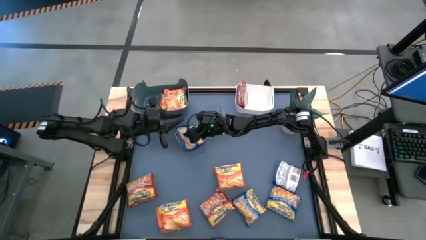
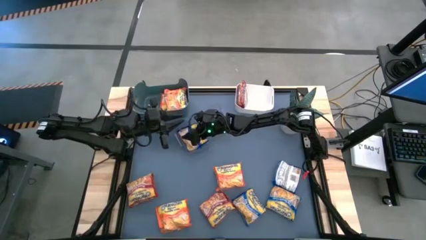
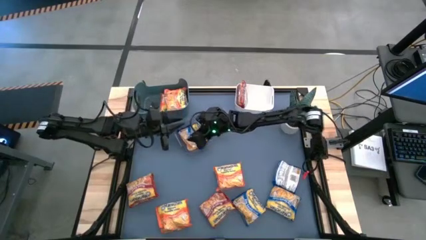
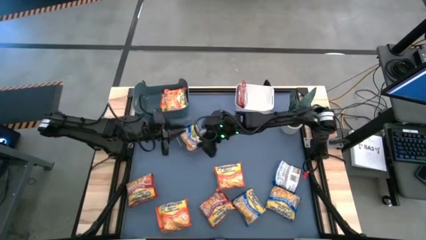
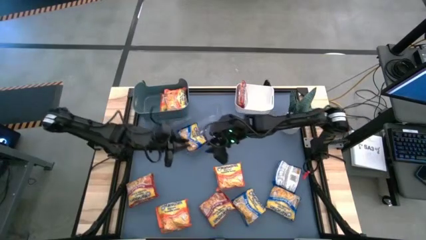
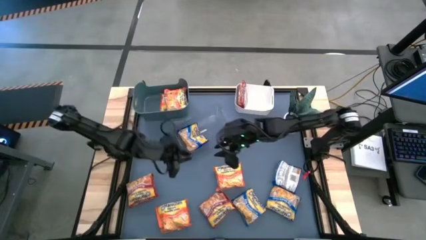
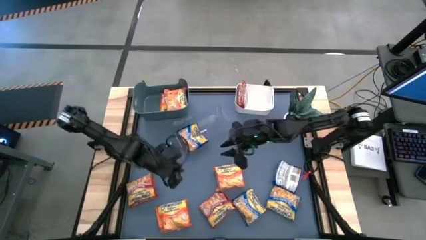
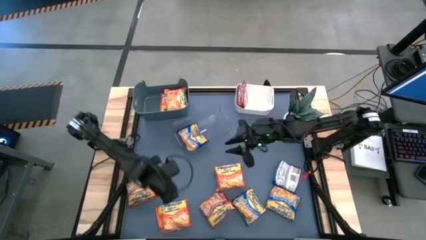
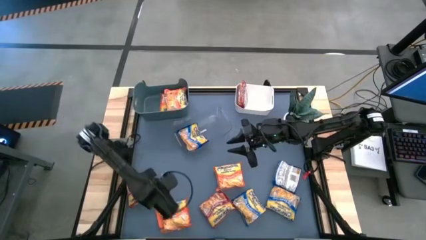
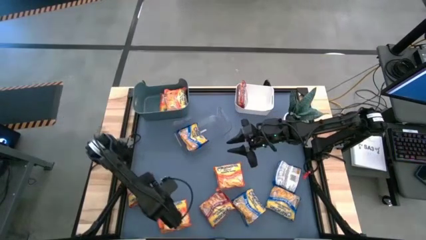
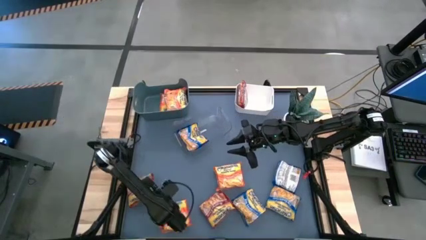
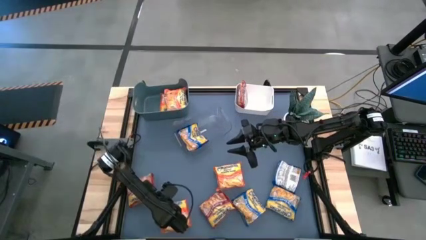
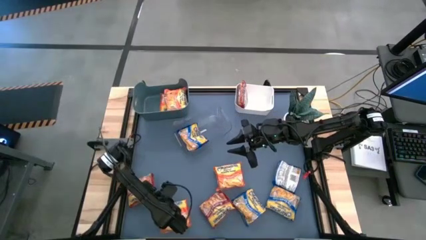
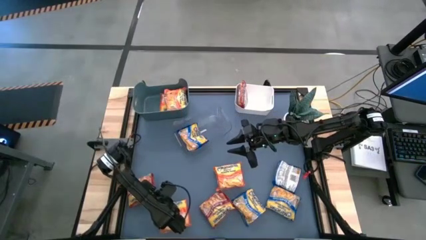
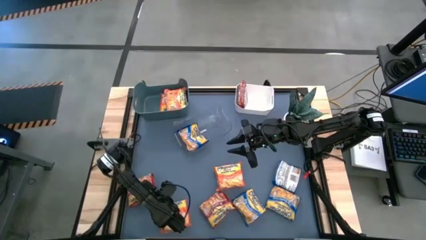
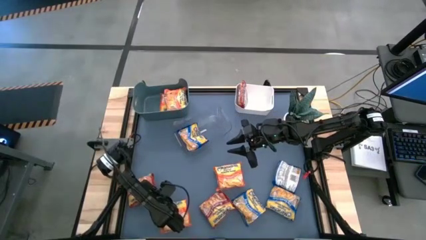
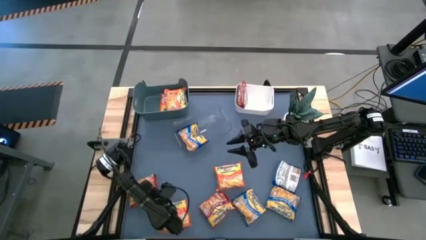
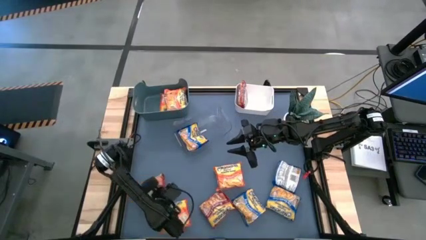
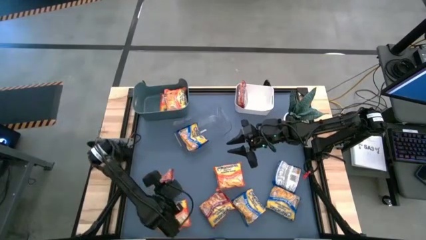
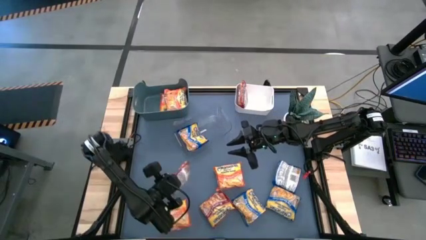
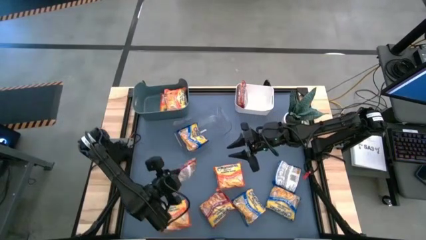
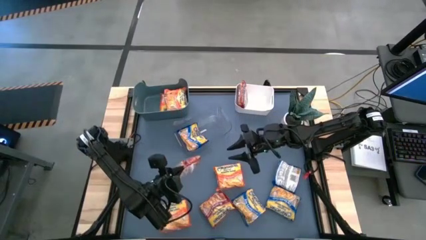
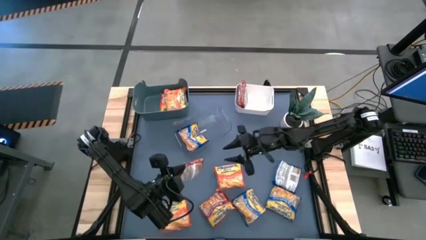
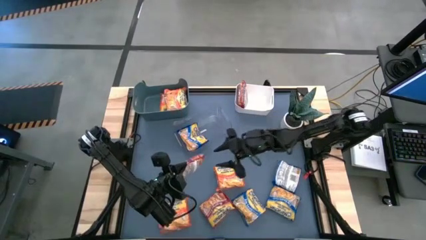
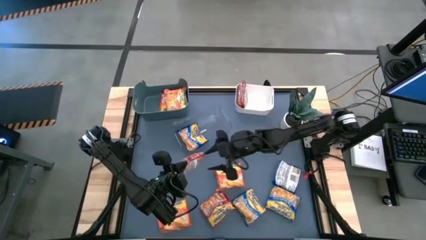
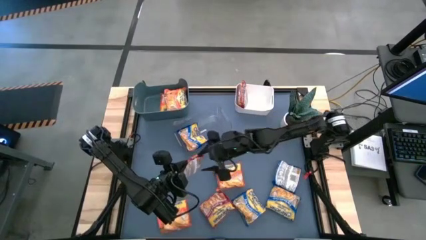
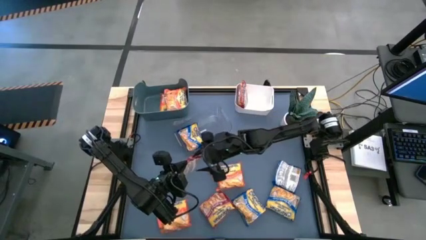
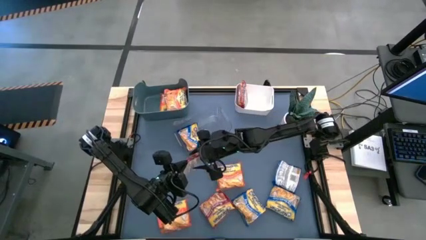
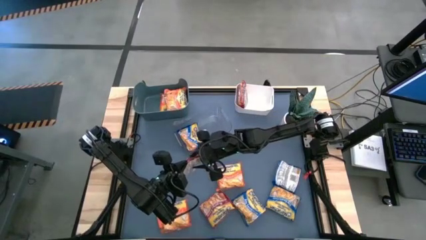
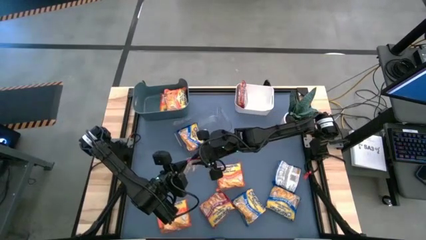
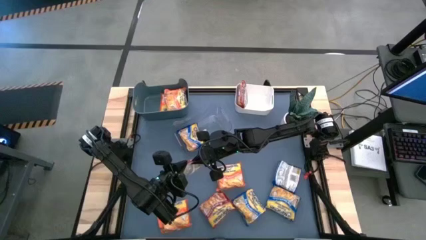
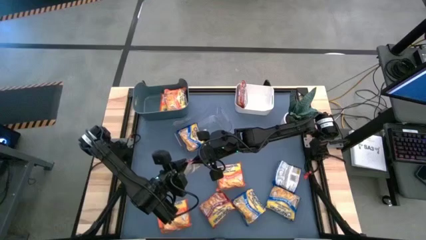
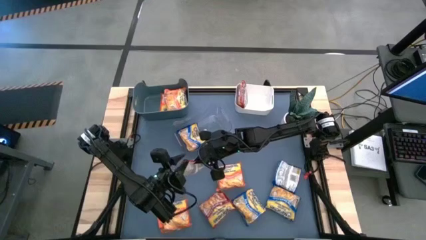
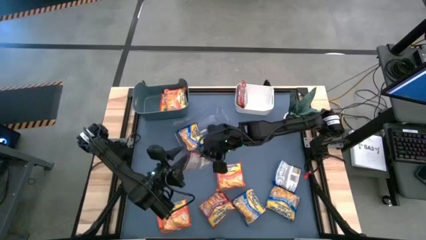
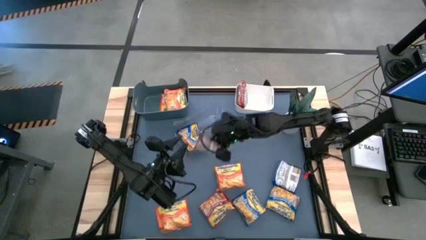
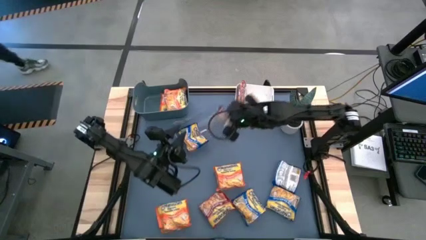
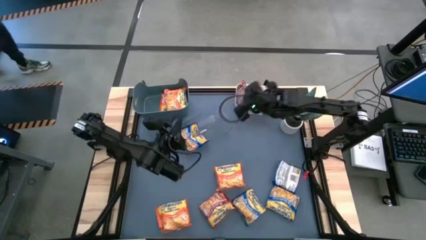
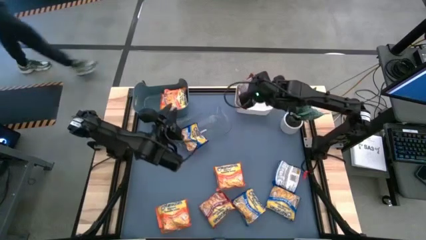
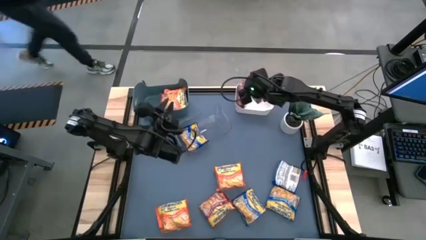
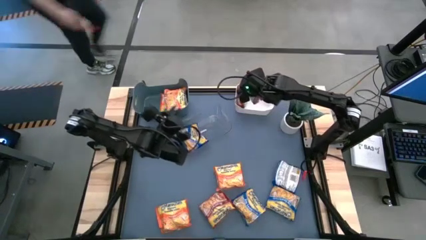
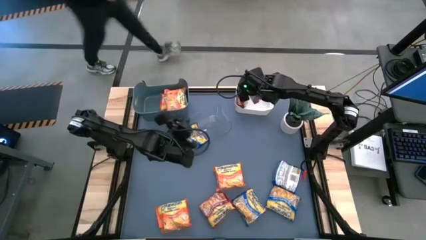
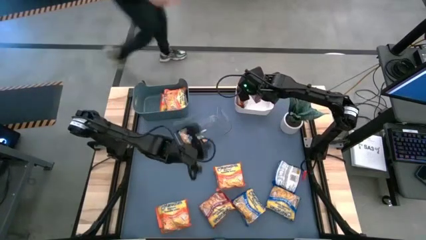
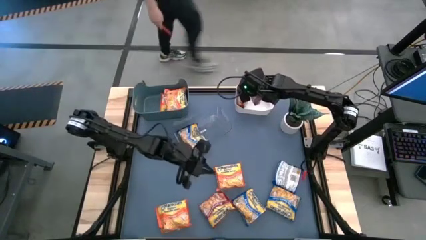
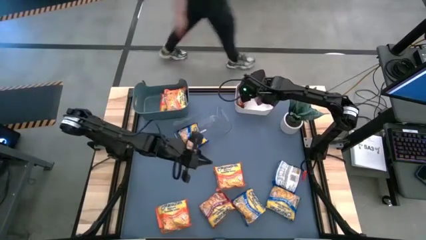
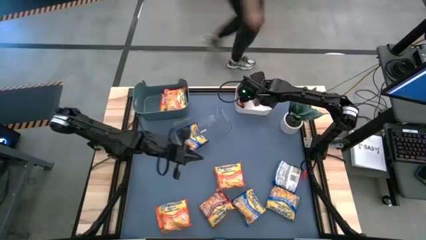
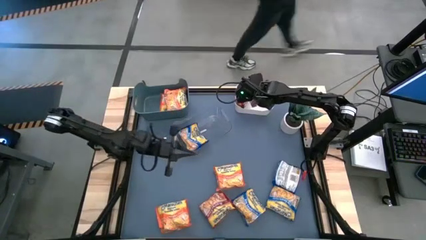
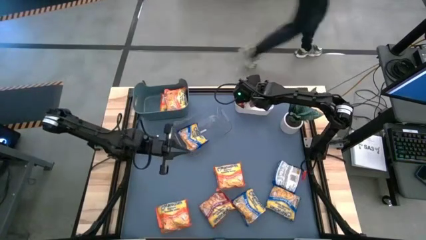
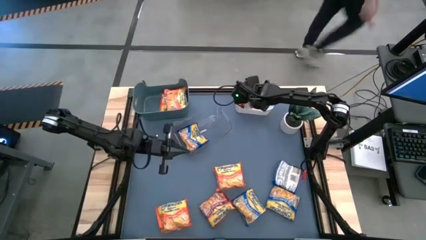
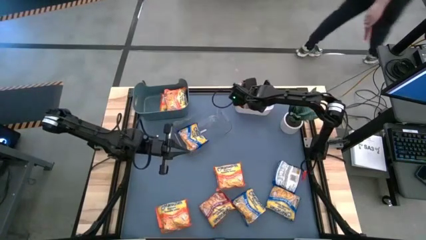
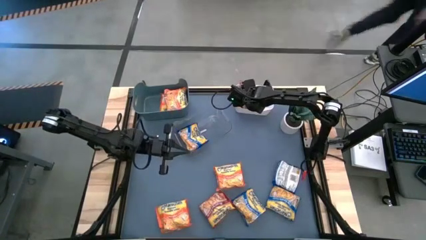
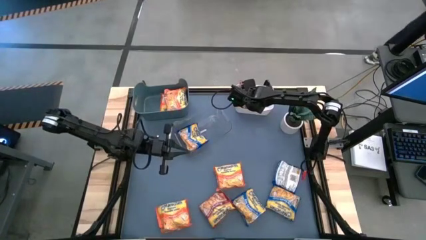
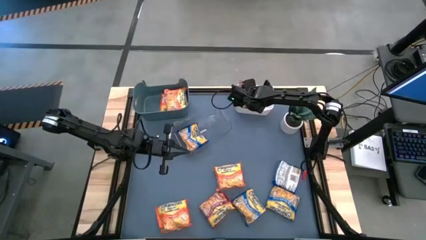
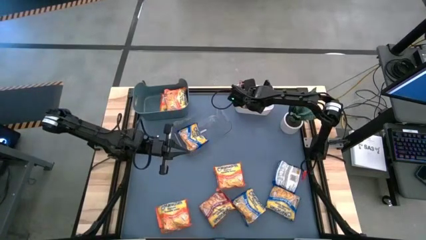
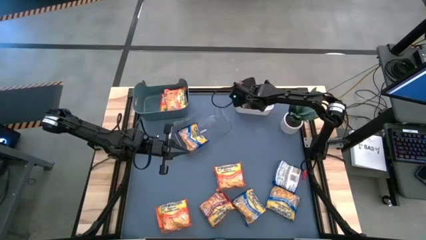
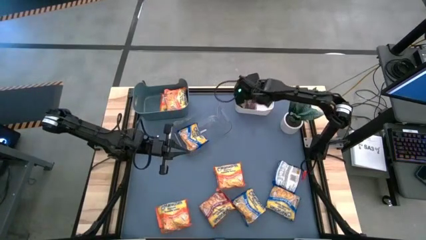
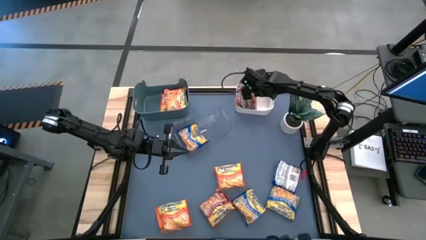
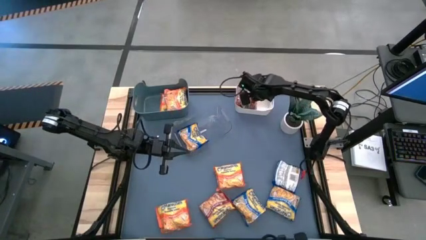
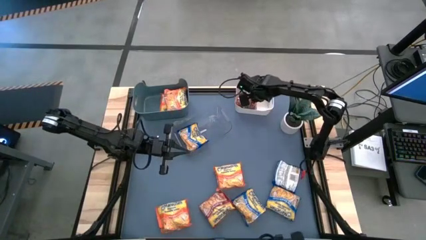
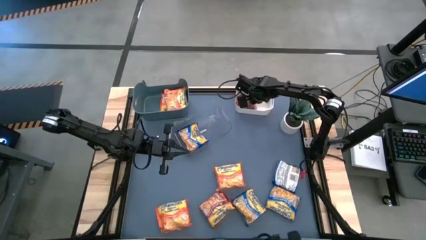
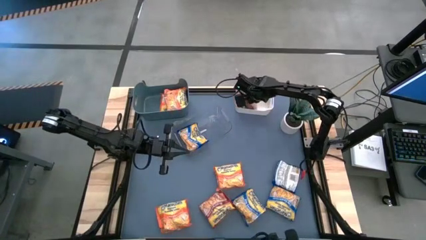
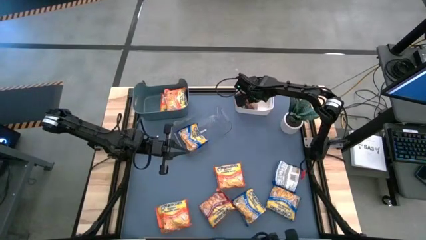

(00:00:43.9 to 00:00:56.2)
Task: Sort Maruchan noodles
Put the red noodle pack into the white bin

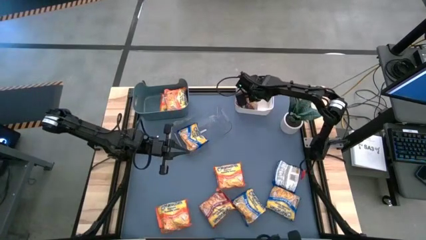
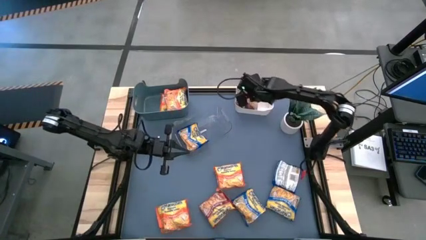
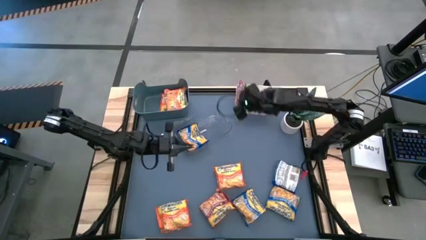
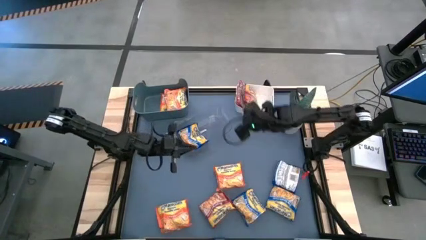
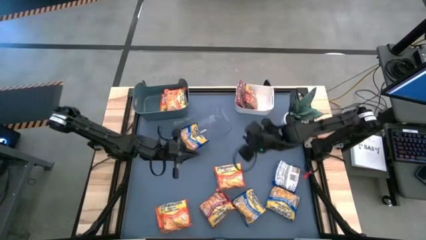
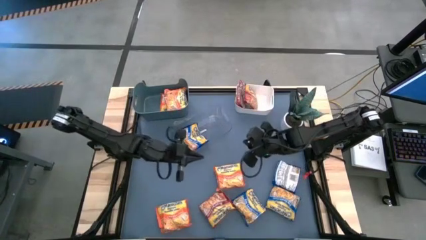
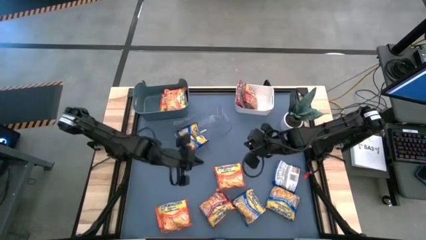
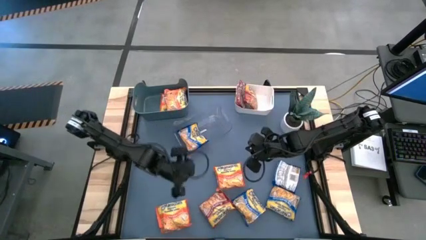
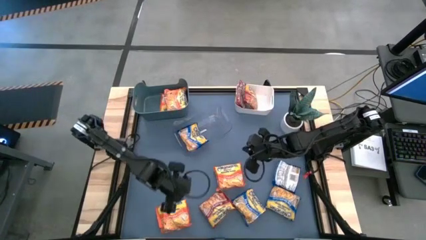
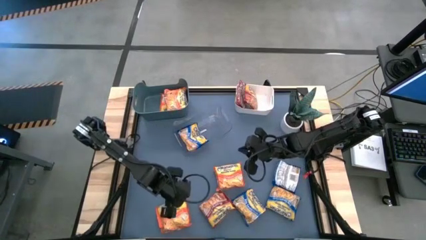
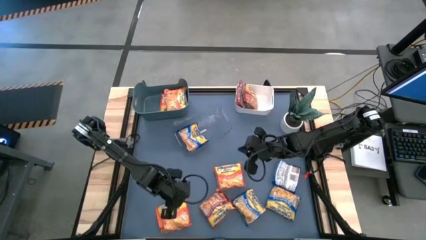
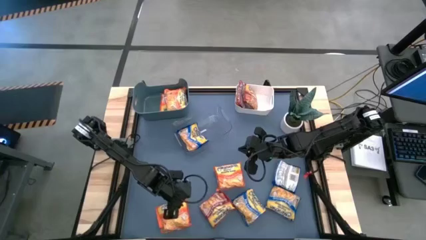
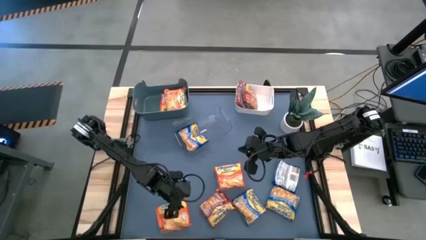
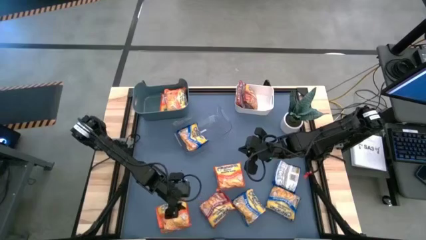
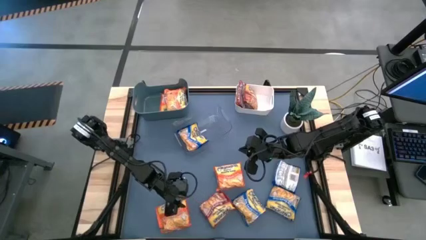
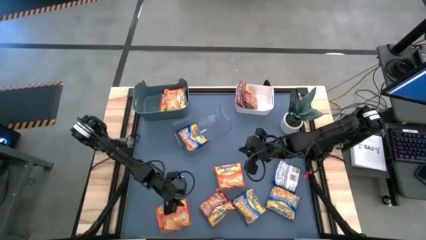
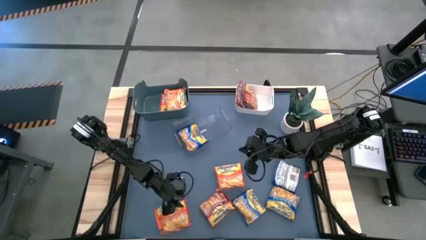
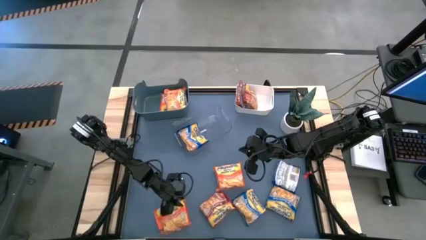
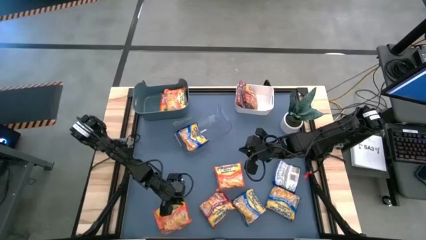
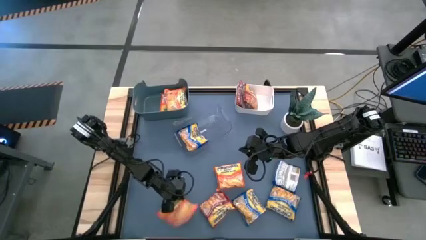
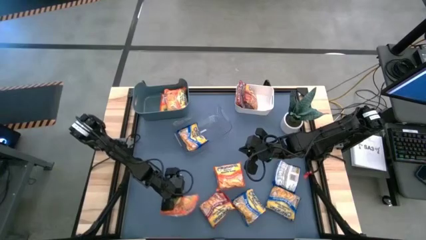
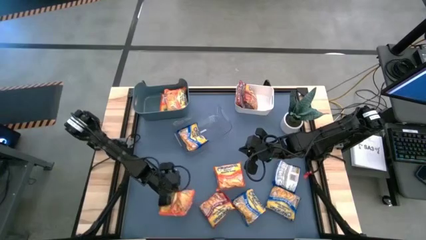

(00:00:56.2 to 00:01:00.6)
Put the orange noodle pack into the blue bin
